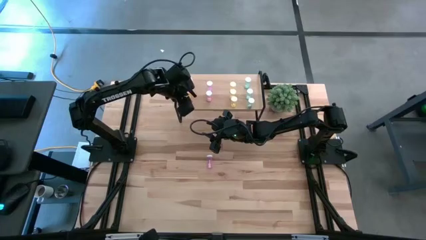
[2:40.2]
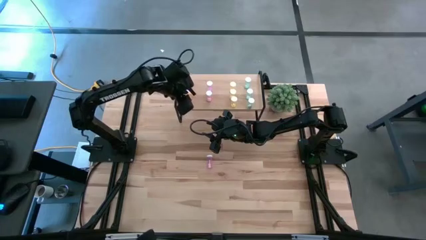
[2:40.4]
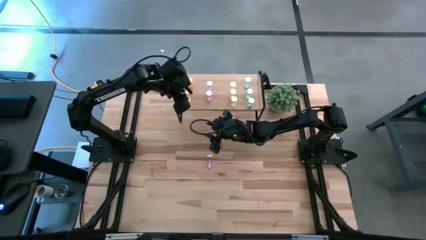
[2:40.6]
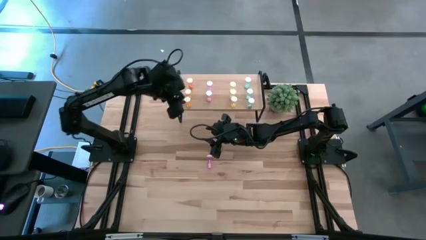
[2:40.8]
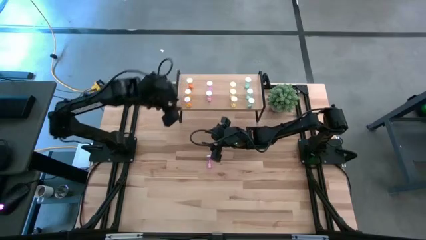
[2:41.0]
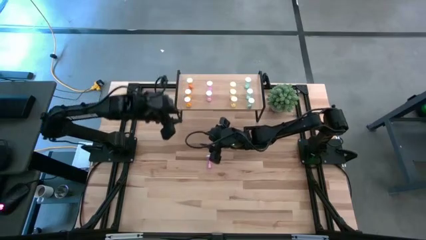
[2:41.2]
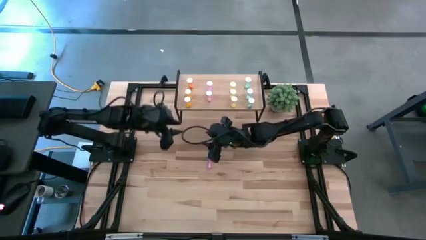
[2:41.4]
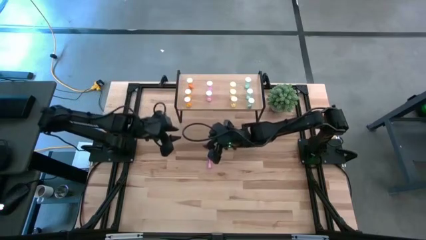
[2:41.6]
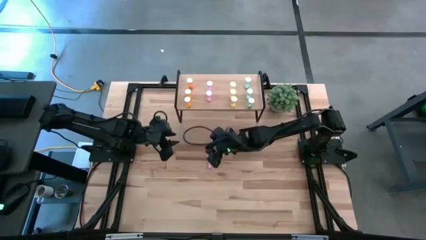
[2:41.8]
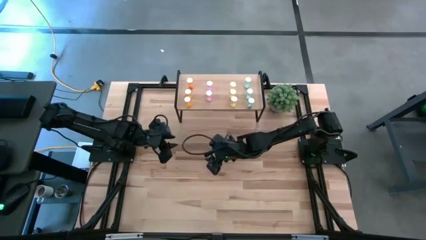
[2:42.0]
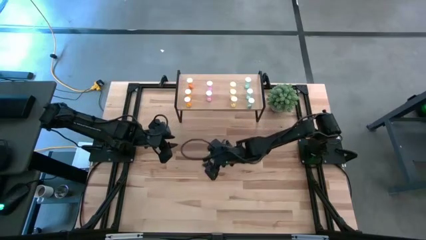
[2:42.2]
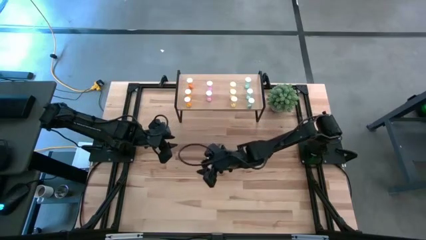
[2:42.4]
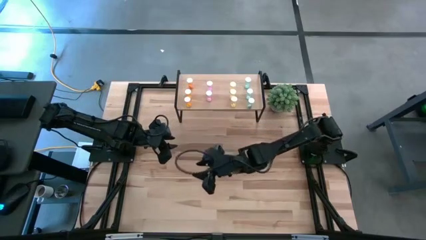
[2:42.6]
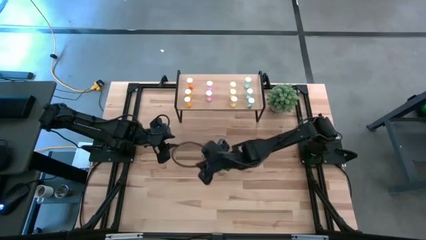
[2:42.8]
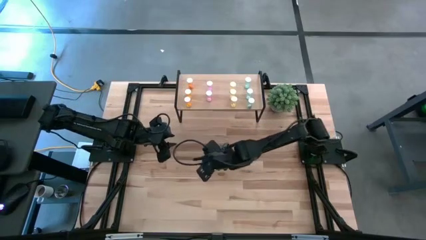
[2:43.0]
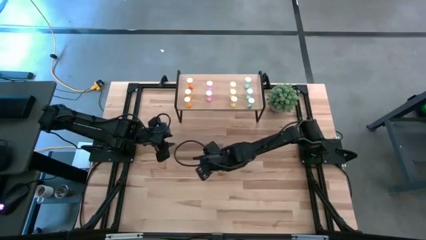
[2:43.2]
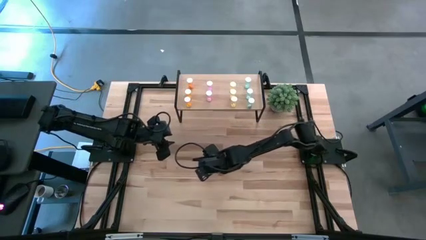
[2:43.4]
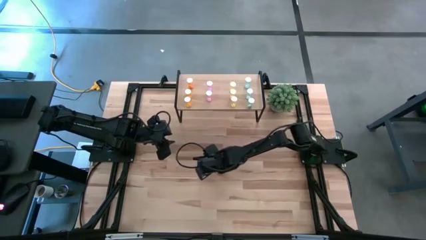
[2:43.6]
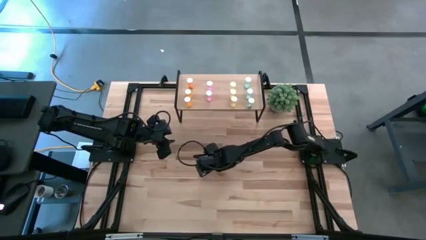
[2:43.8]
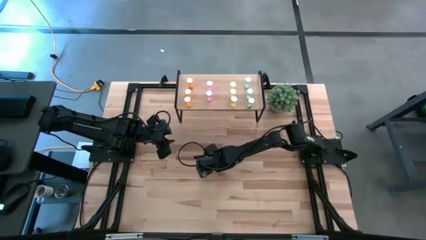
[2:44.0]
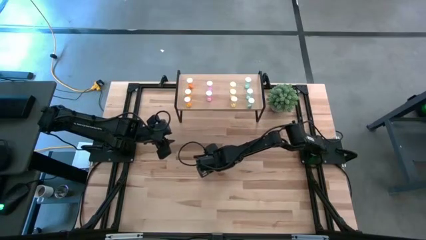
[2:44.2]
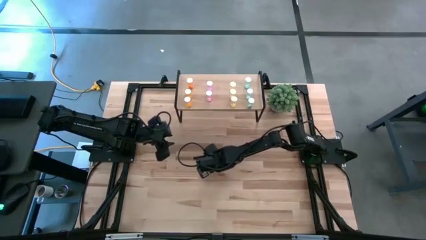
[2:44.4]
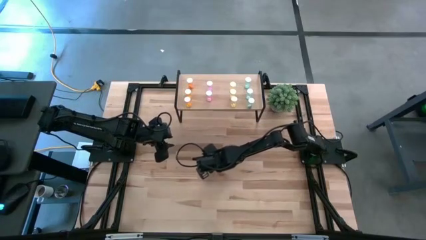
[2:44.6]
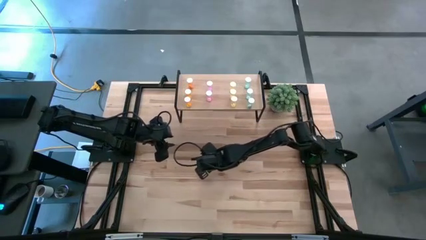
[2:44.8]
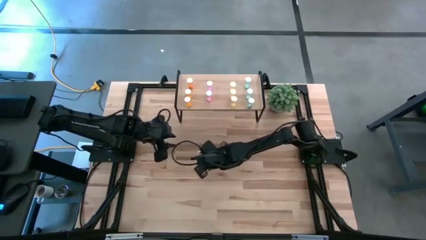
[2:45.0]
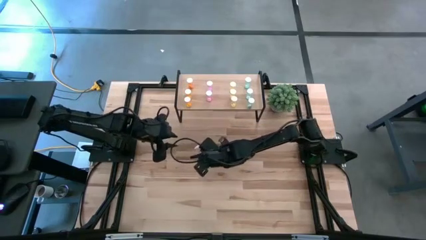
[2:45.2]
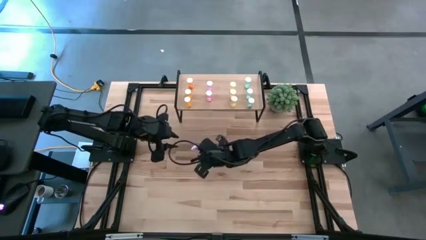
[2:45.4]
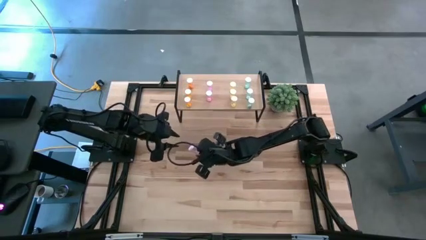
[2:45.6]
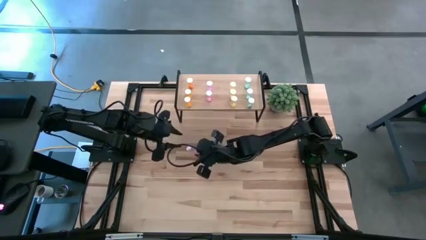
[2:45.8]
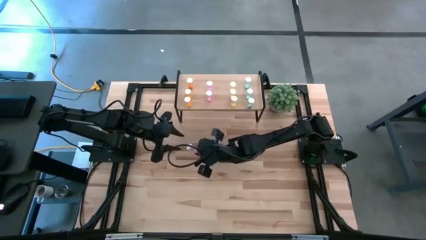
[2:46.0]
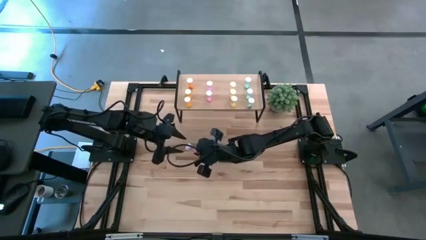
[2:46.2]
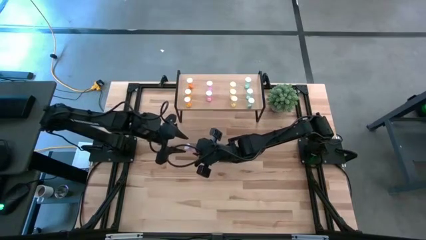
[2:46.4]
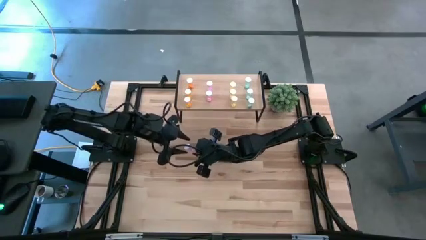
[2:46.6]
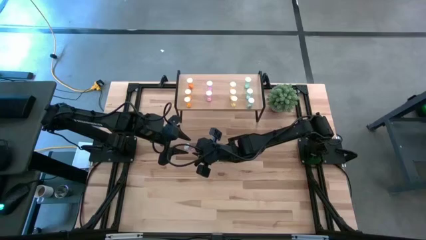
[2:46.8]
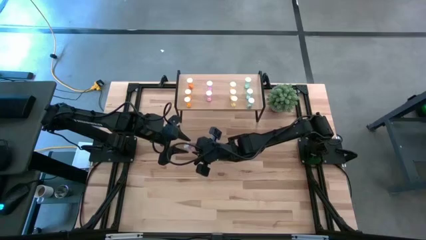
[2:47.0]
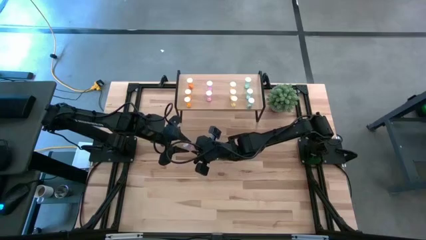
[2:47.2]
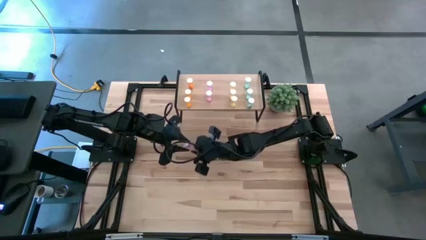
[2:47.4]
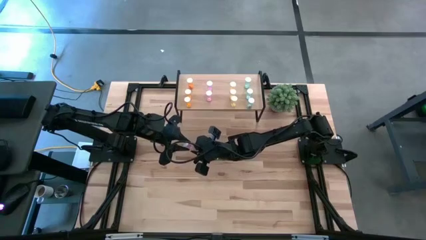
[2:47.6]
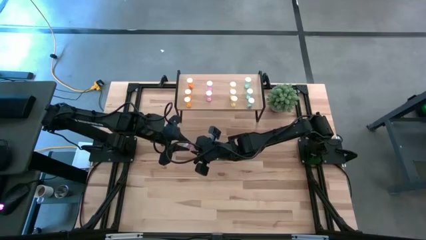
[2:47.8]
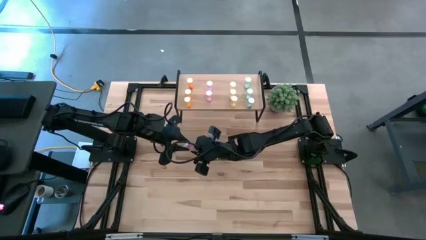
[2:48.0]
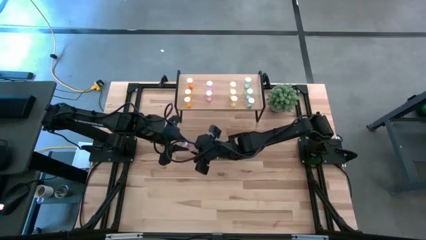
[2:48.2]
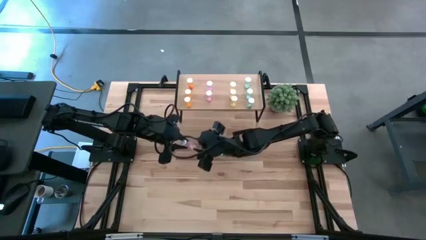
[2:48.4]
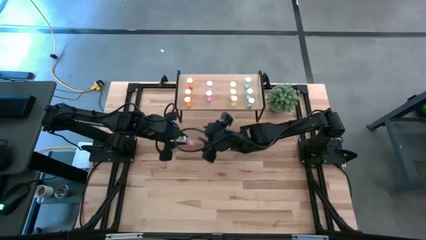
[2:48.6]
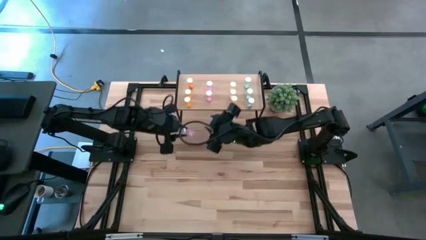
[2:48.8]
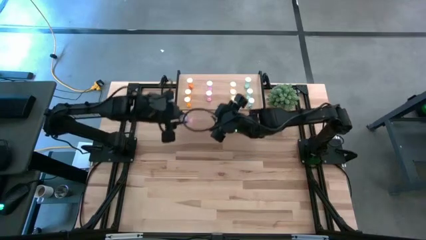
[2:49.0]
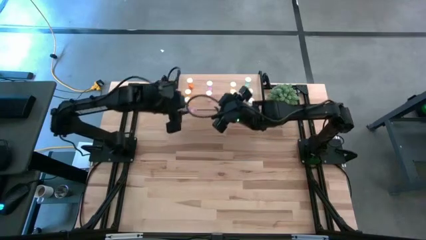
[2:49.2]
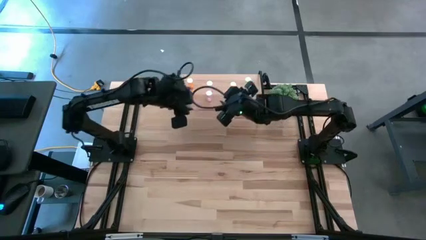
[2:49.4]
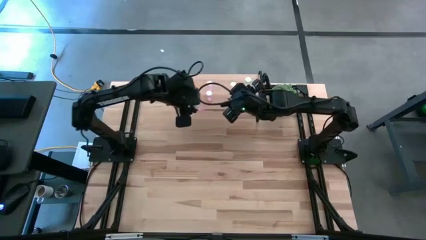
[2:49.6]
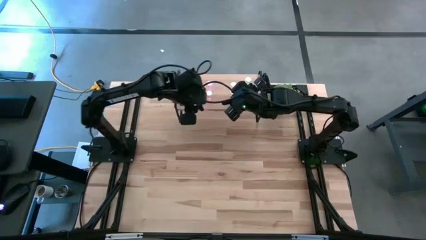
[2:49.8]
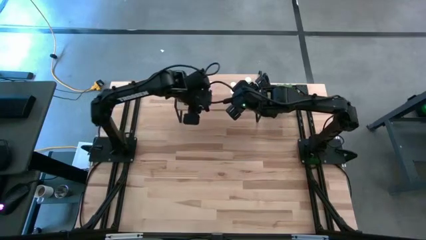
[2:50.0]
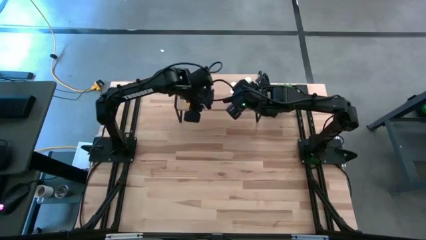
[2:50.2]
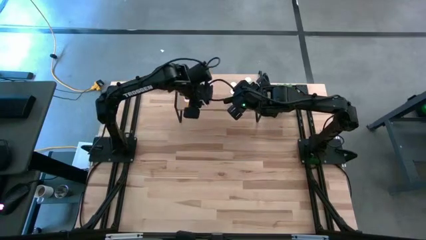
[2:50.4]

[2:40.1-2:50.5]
Task: Pick and place medicine bottles onto shelf by color
Put the pink pill bottle on the shelf aligned with the other pink pill bottles

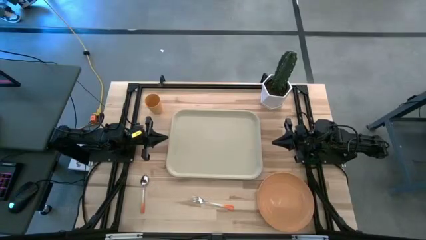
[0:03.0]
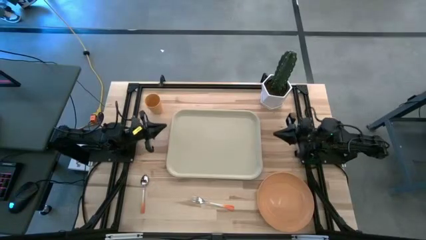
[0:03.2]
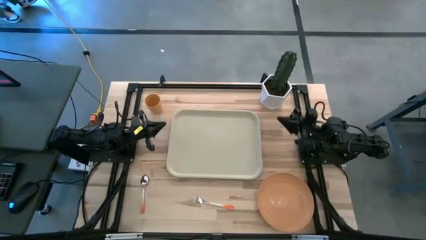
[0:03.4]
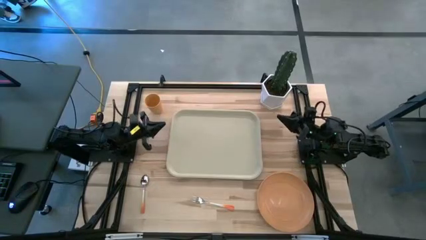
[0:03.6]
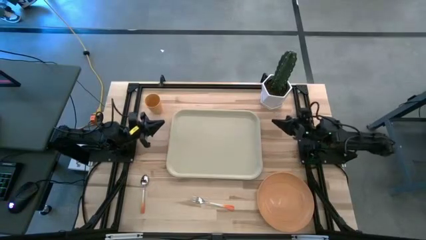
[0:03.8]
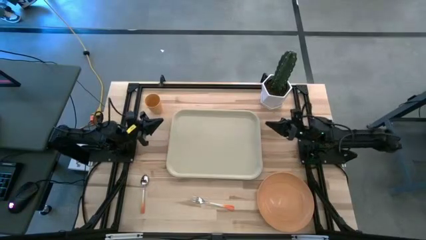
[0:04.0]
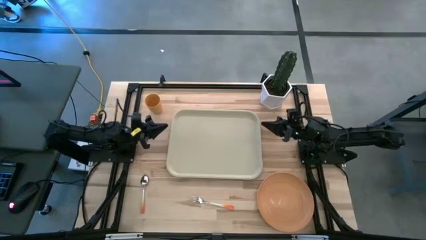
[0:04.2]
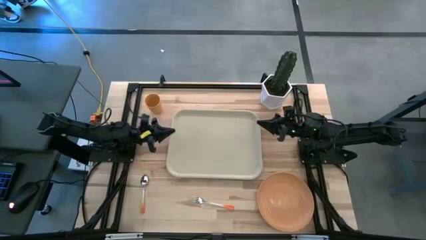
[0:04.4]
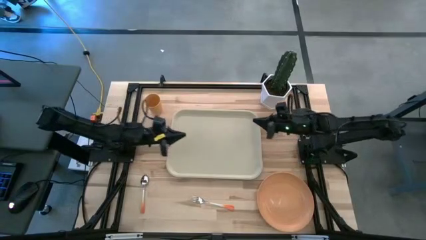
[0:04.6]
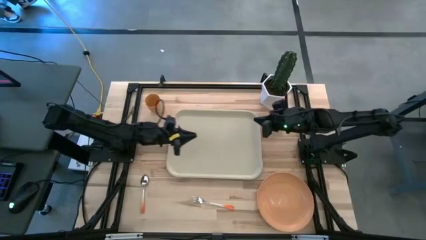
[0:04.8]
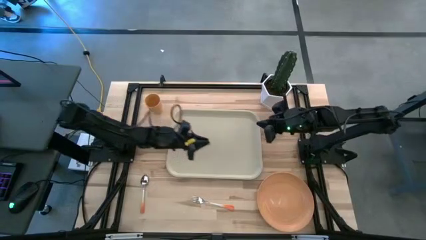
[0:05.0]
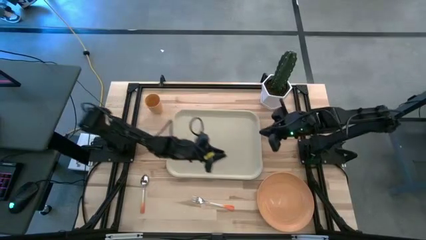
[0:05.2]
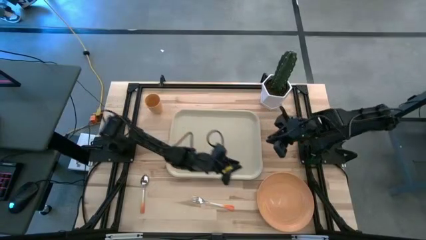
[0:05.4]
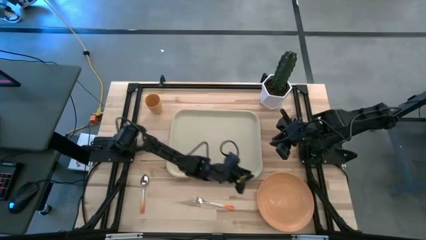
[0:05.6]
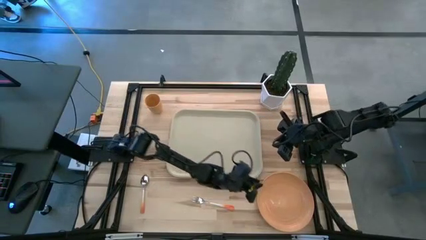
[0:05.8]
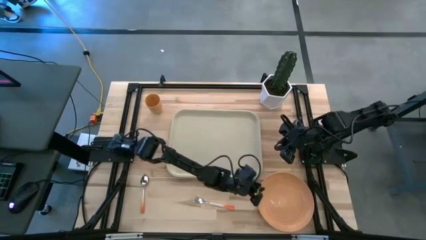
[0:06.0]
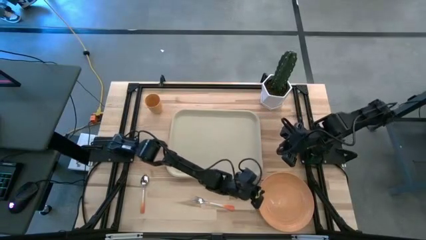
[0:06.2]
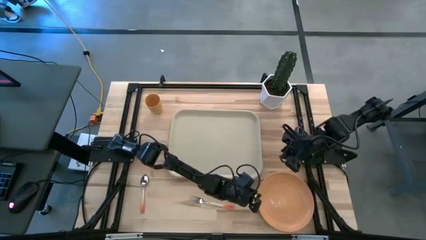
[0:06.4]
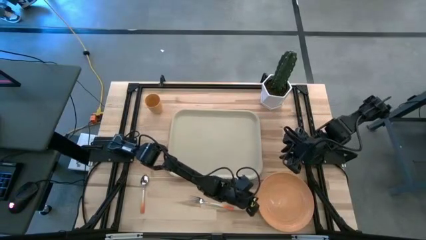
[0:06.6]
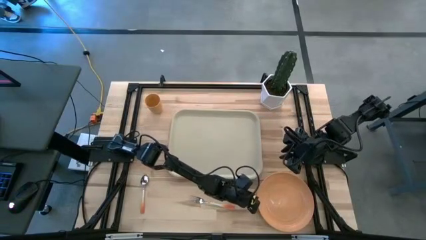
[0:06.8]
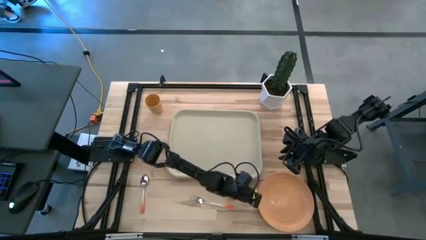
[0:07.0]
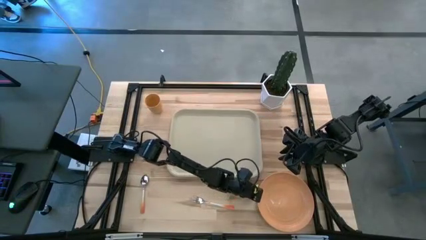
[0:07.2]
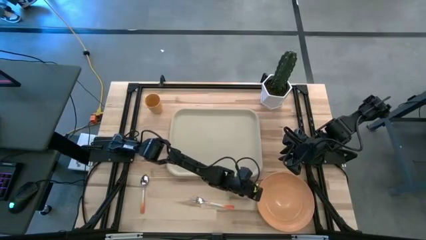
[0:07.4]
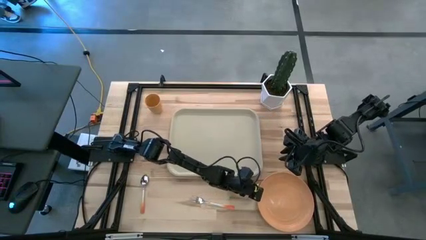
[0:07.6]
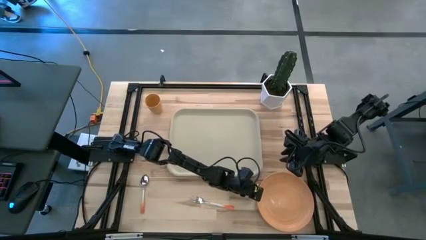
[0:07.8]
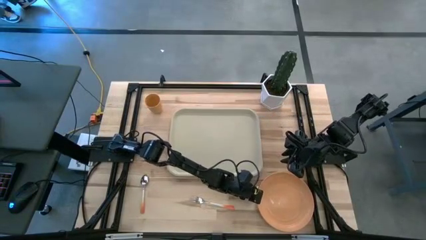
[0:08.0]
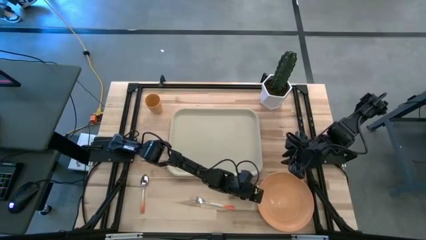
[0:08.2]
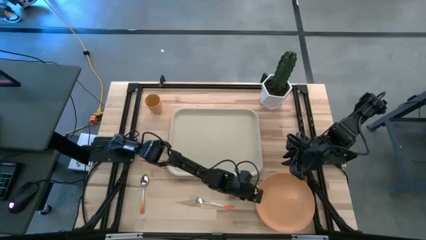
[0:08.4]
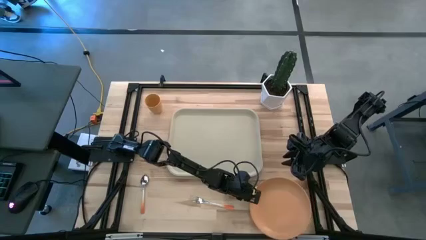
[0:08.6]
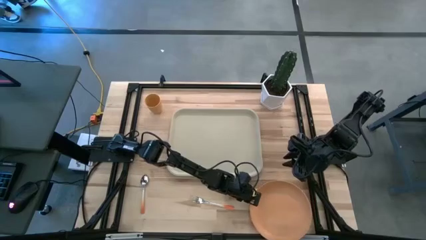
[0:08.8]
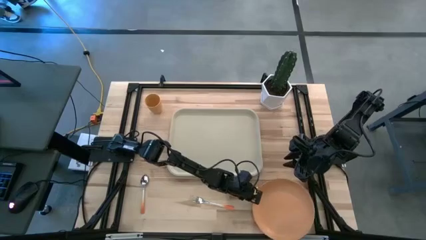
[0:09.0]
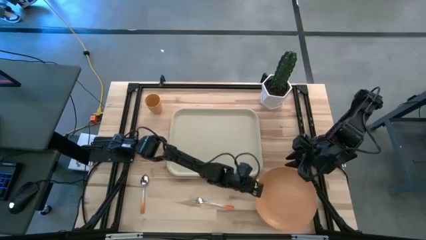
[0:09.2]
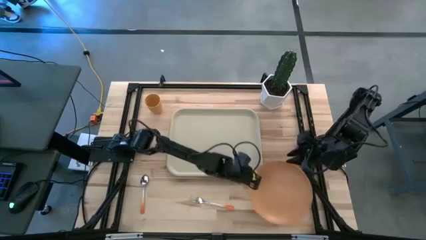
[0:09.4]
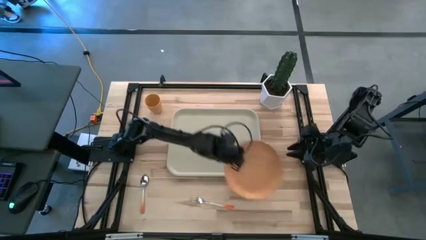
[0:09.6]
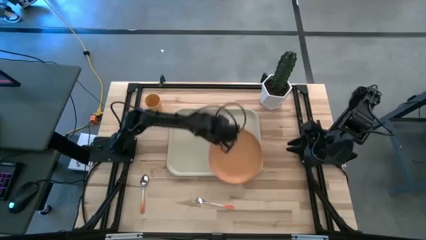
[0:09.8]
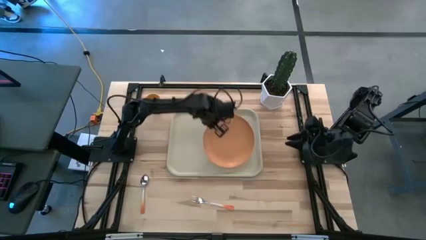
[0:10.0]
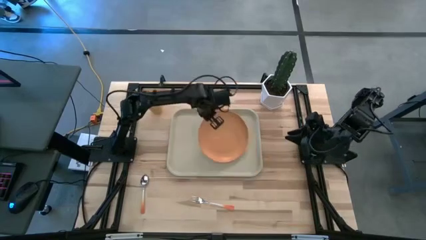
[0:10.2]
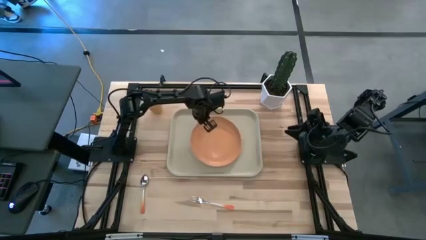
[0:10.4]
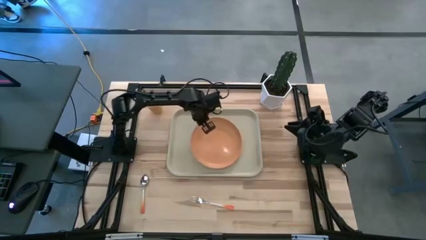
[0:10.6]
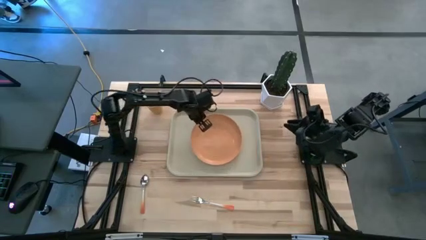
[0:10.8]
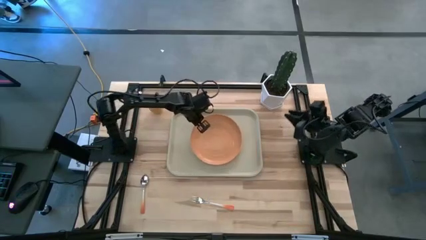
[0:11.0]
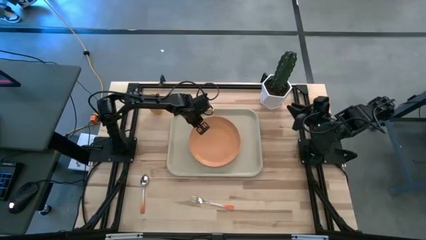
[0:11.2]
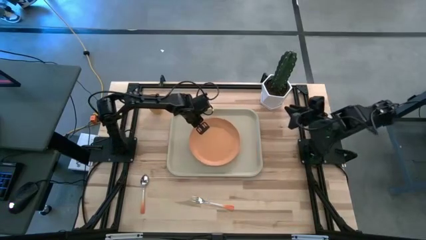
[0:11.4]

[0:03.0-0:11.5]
Task: Pick and place plate/cup/fork/spoon on tray
Put the light orange plate on the white tray
